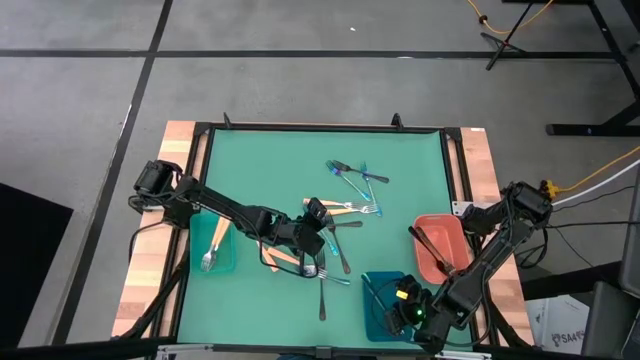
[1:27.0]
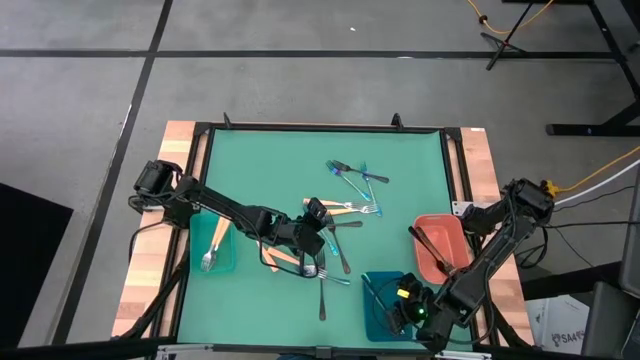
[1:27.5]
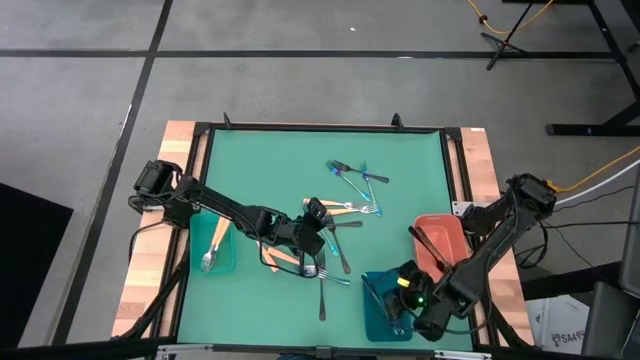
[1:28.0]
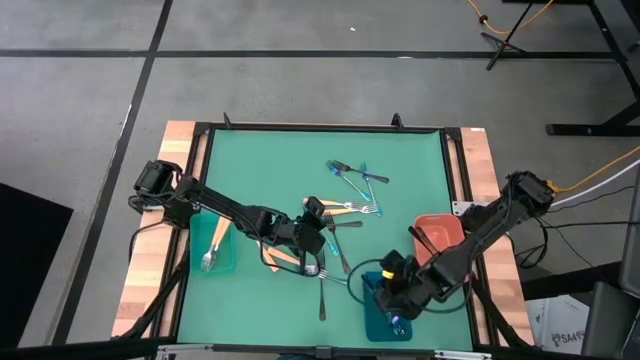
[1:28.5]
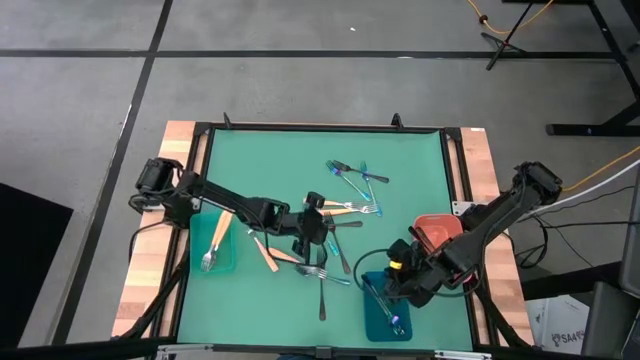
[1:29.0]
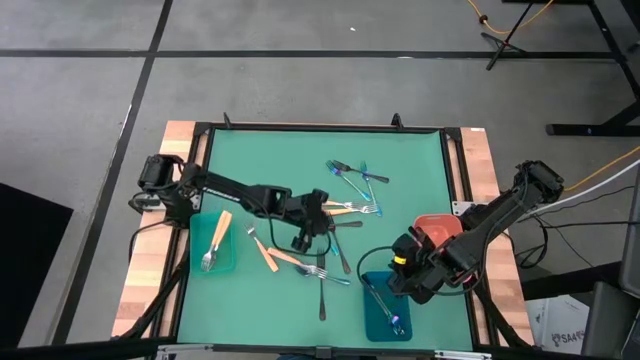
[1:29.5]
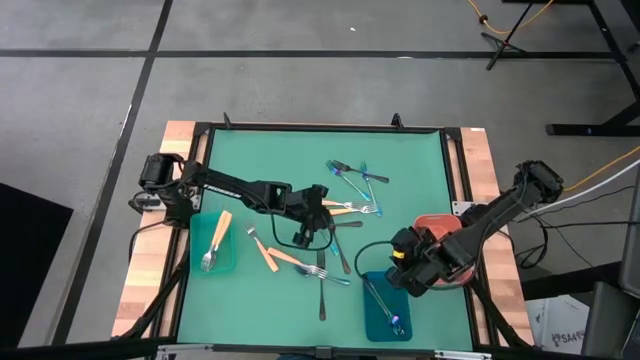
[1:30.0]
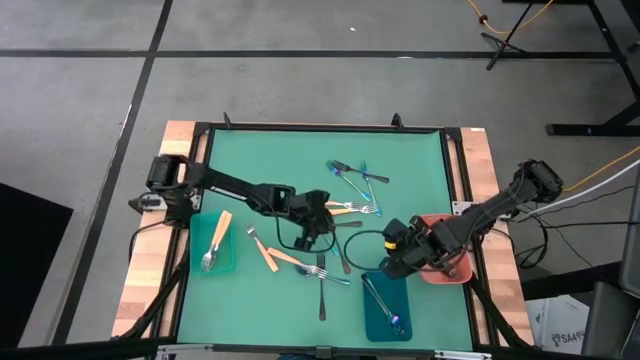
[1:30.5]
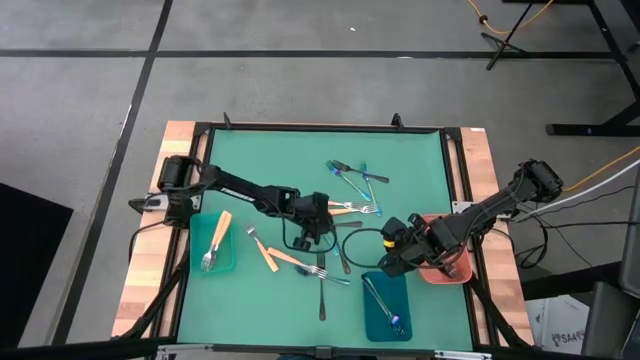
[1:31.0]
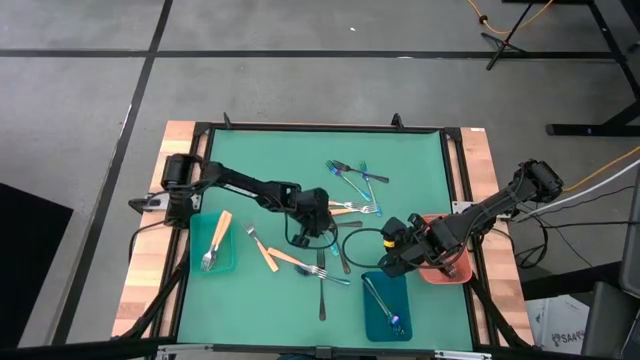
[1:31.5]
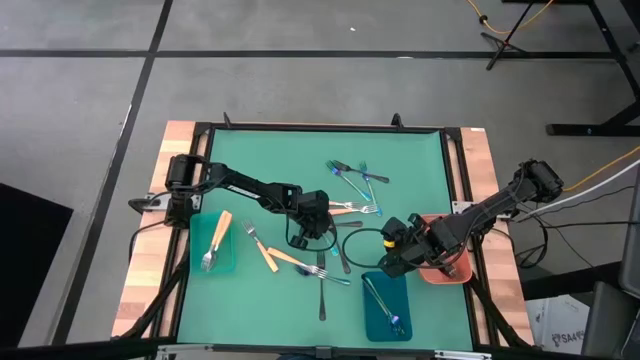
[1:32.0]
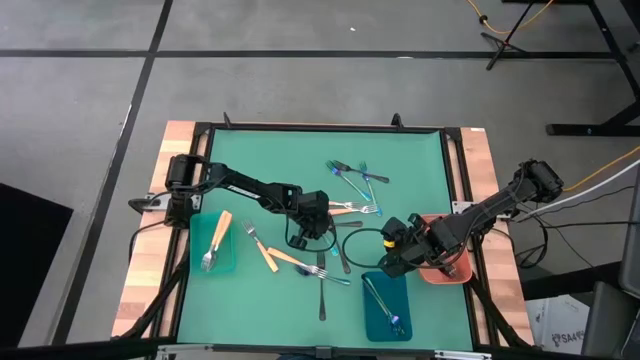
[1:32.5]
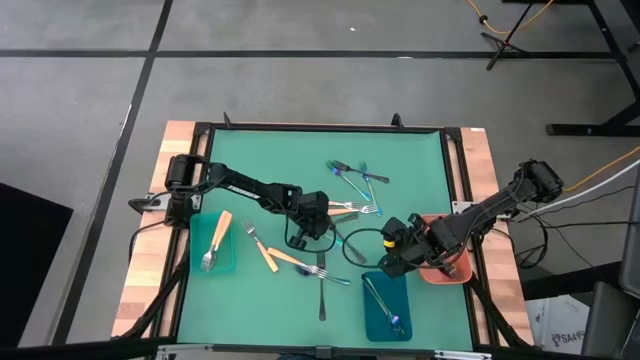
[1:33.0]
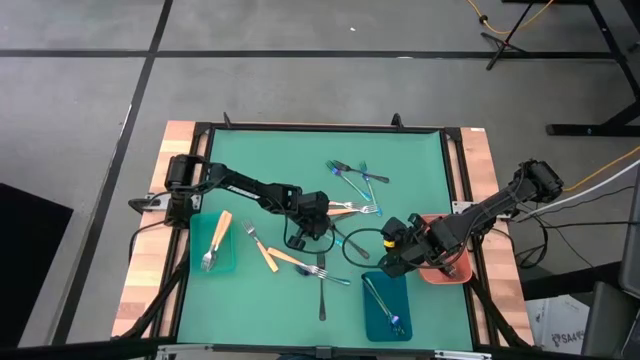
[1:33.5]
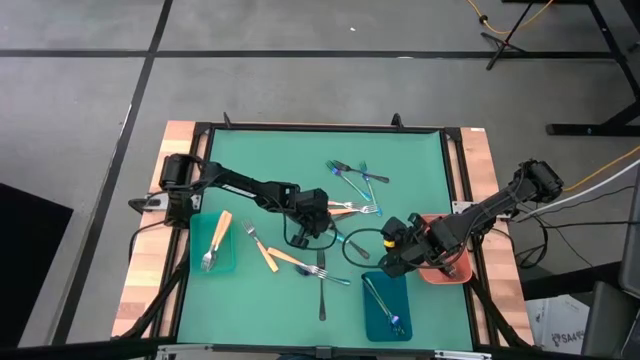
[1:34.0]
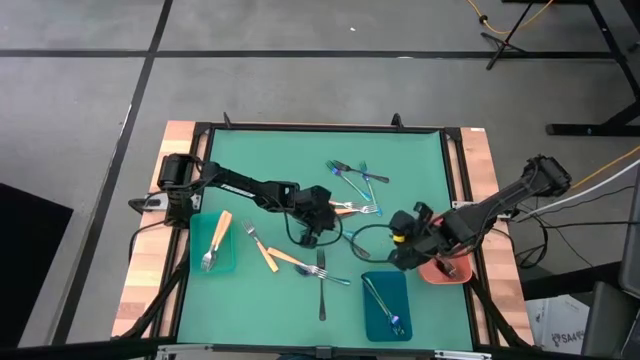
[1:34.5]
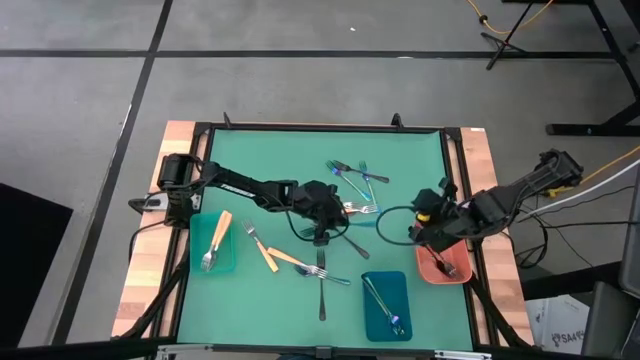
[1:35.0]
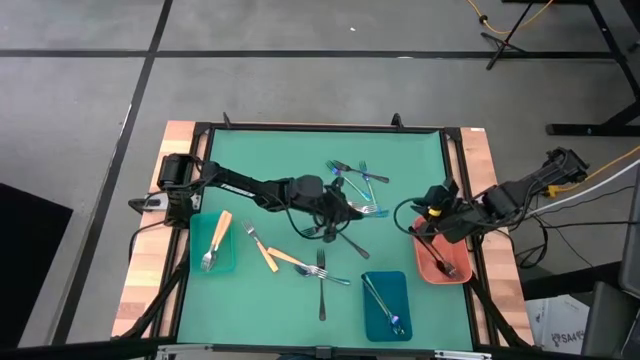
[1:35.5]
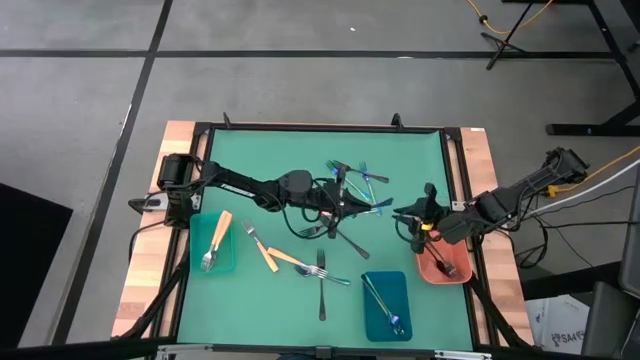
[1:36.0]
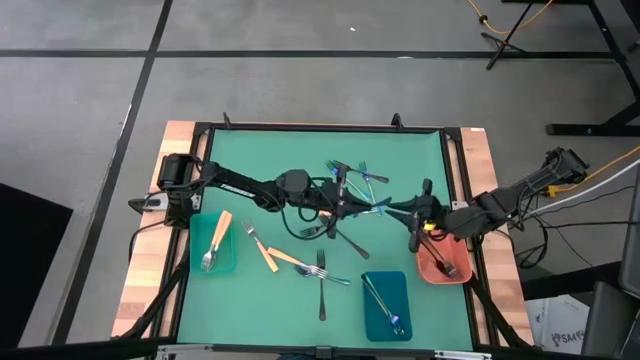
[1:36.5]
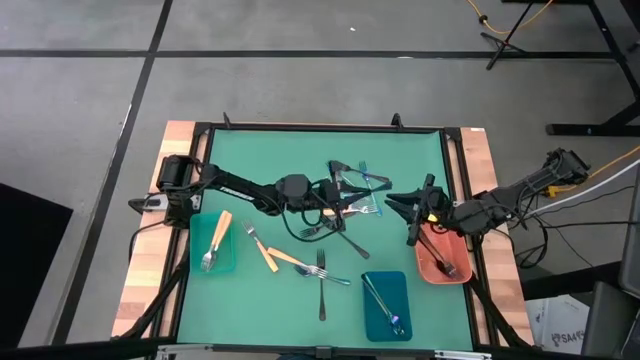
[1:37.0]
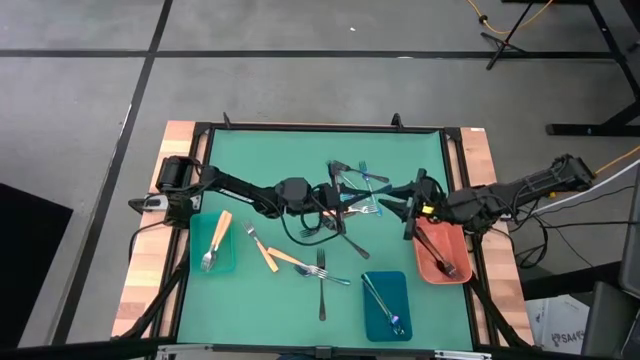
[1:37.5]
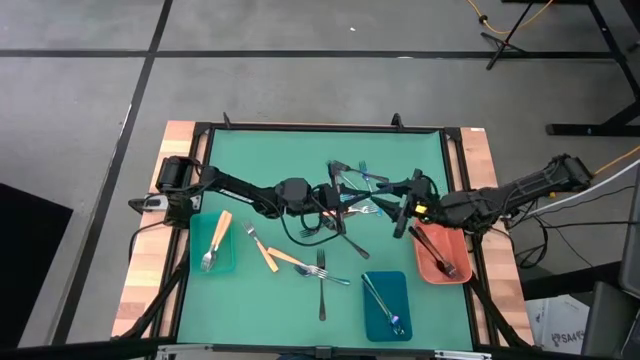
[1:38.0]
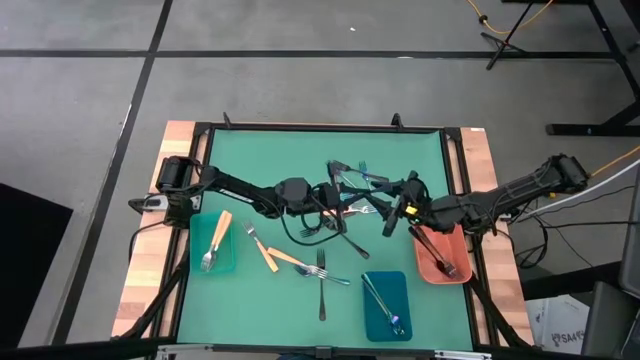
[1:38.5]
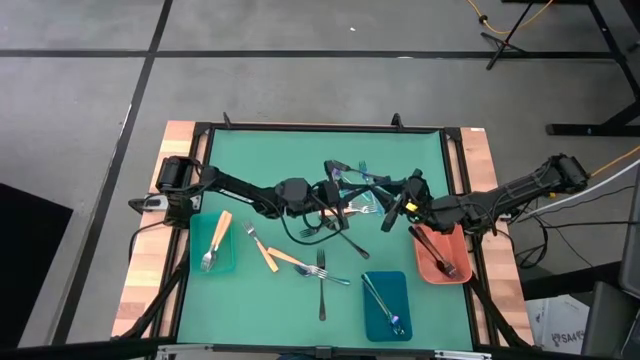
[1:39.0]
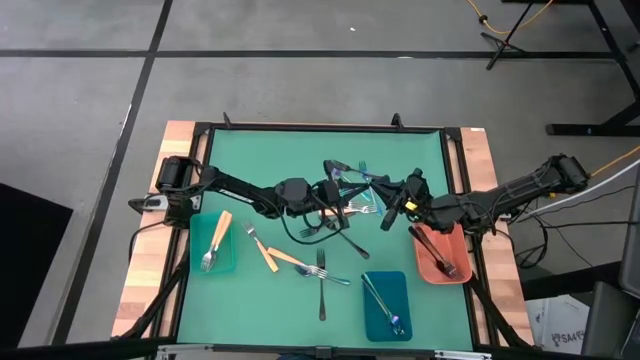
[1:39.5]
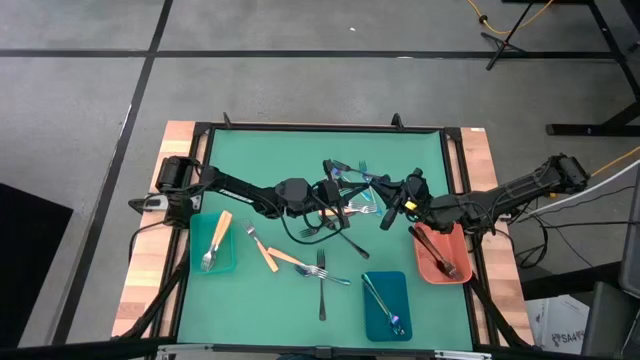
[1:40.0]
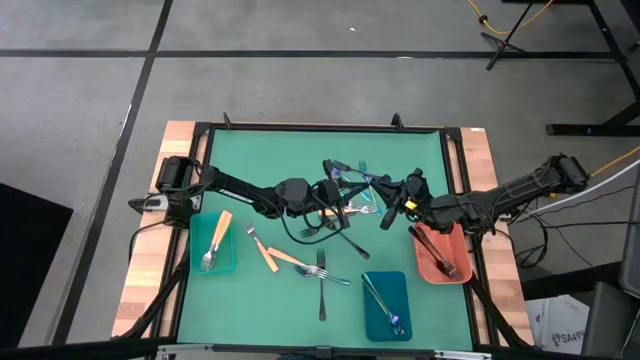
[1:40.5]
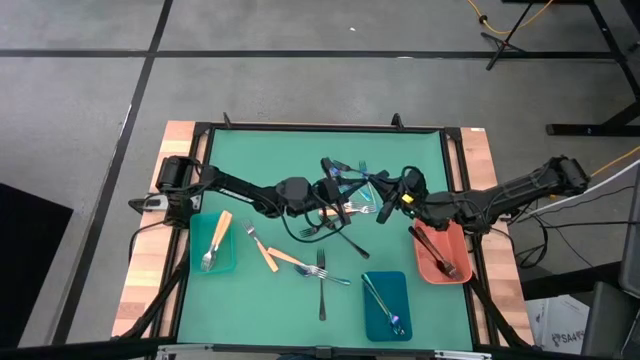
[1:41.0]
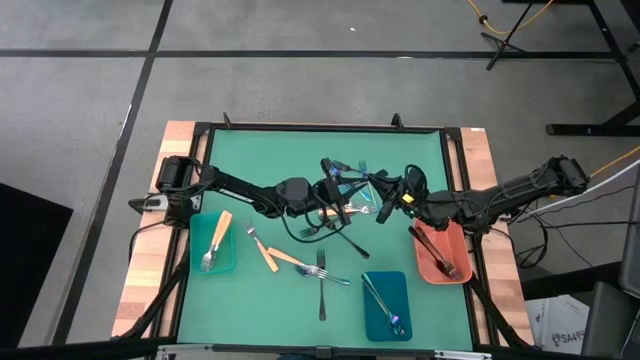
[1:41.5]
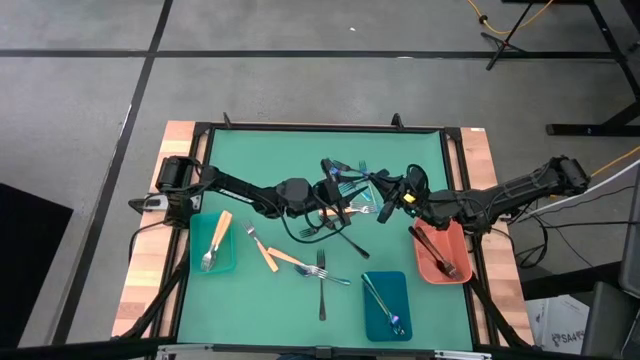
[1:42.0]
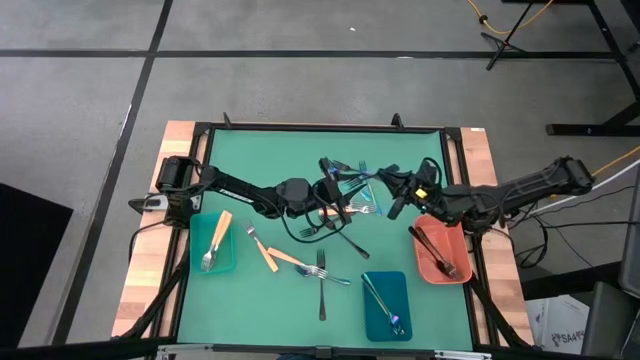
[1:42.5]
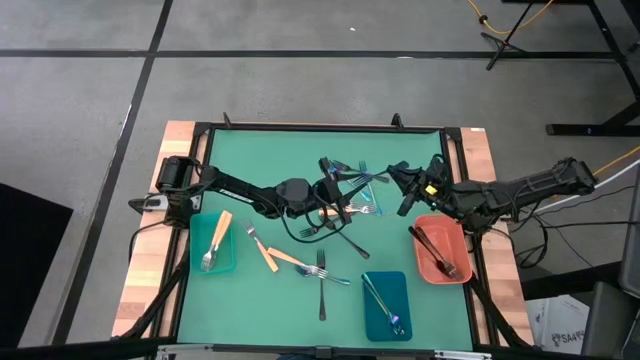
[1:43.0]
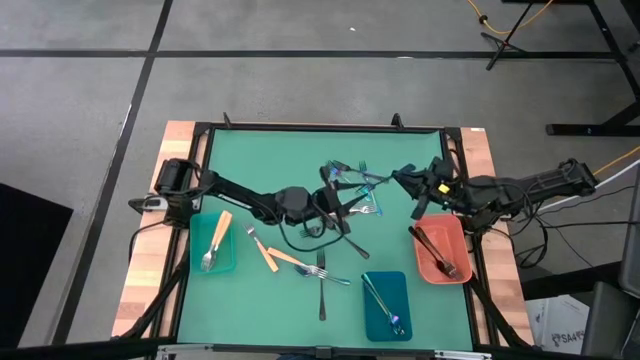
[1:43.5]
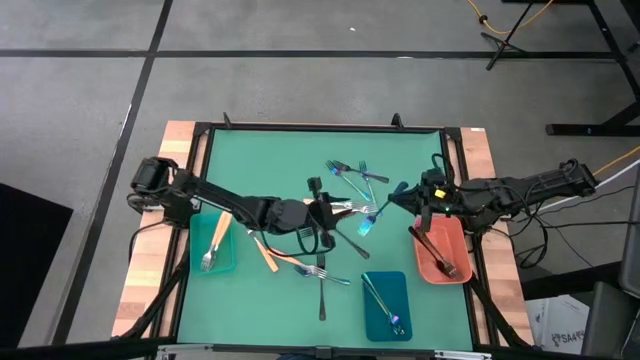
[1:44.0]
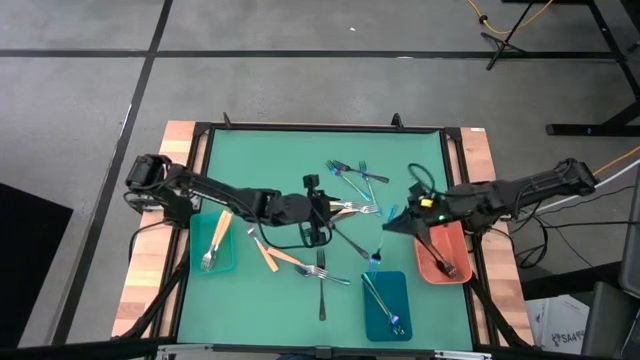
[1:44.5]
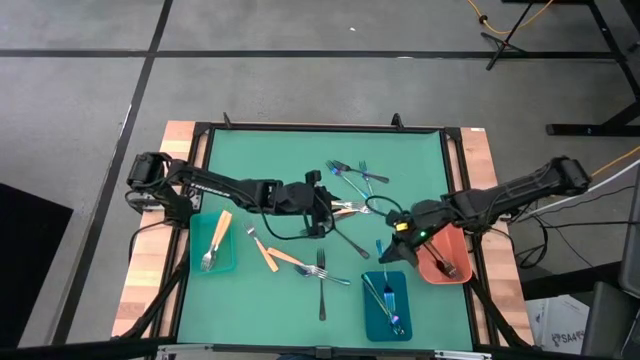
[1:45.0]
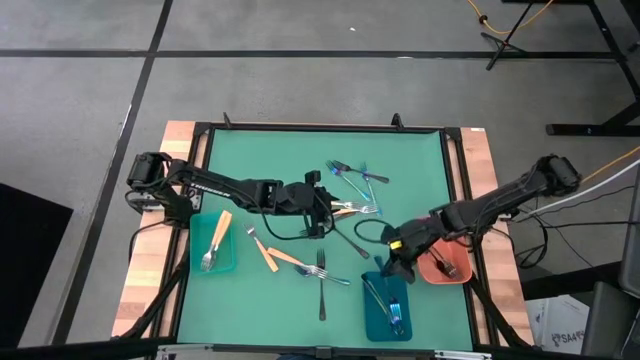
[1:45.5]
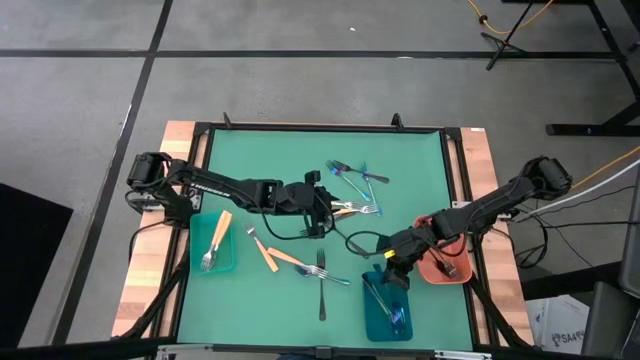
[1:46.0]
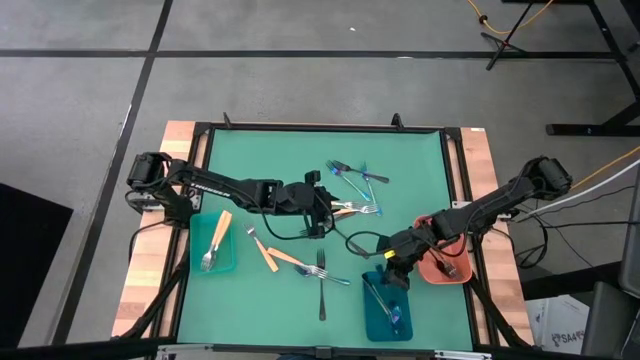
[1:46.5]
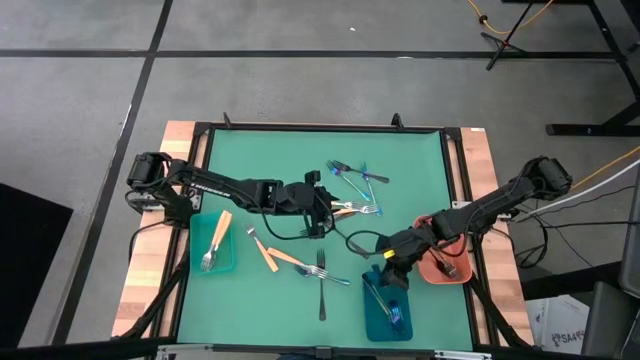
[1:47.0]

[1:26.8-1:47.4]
Task: Sort silverware by color (type)
Put the blue fork into the blue bin
